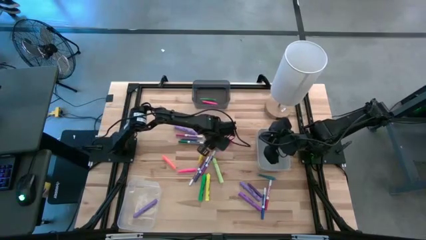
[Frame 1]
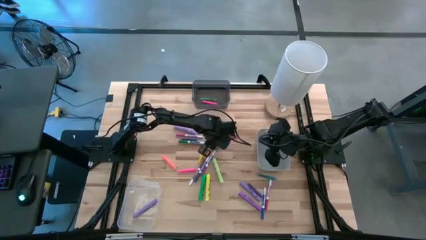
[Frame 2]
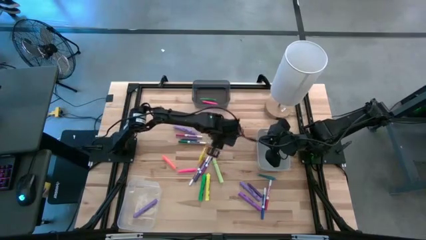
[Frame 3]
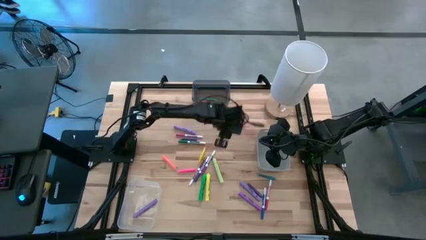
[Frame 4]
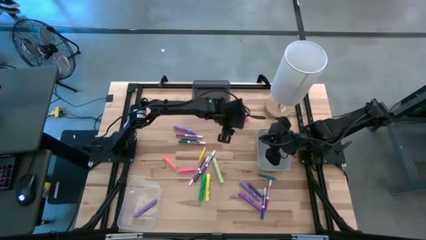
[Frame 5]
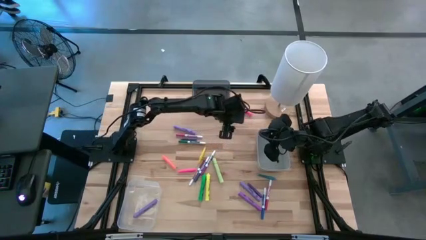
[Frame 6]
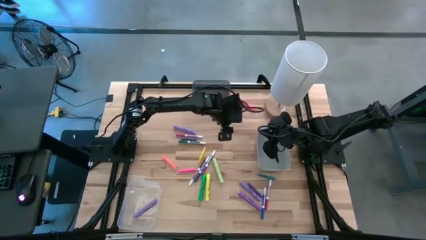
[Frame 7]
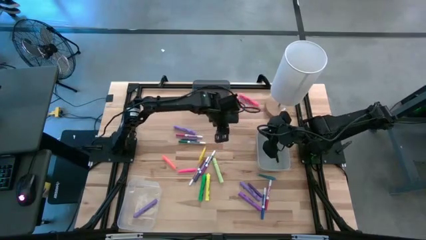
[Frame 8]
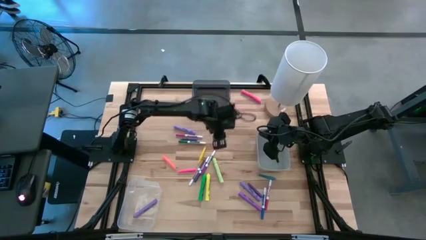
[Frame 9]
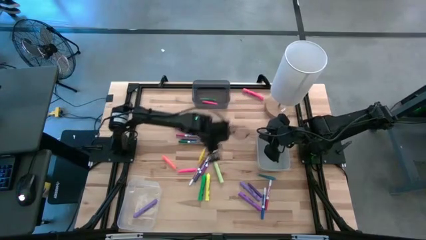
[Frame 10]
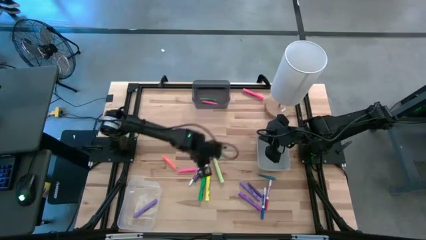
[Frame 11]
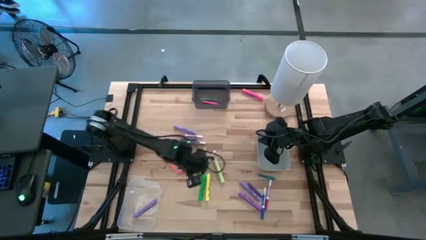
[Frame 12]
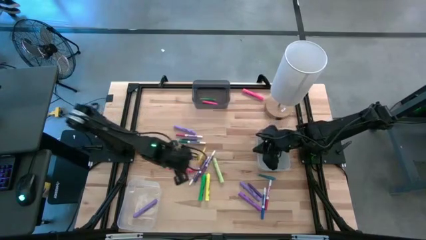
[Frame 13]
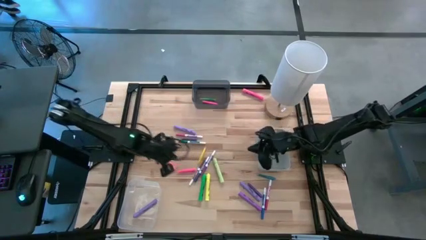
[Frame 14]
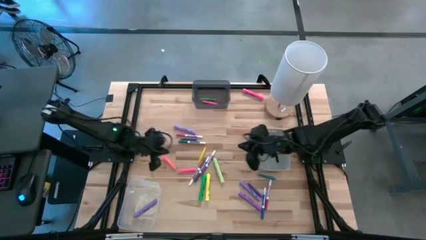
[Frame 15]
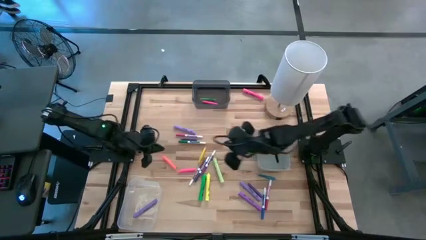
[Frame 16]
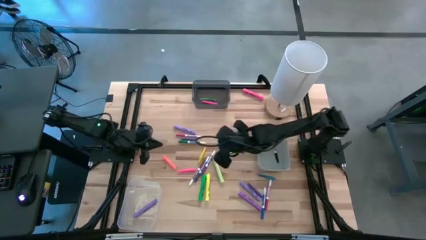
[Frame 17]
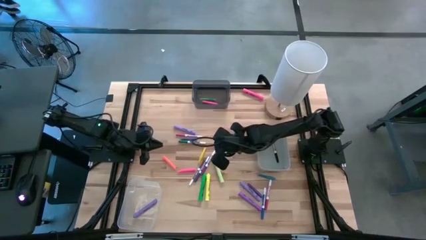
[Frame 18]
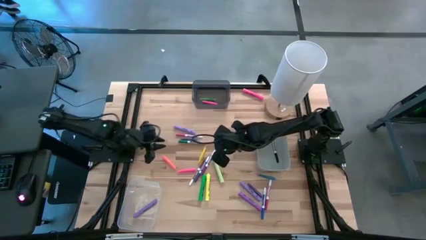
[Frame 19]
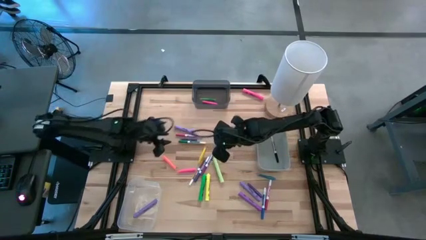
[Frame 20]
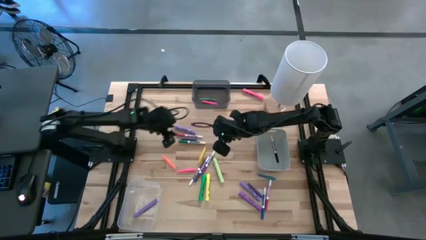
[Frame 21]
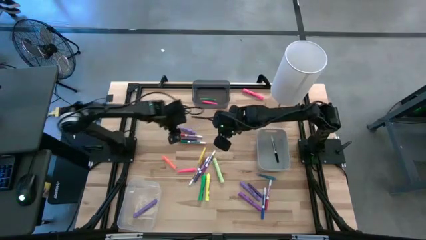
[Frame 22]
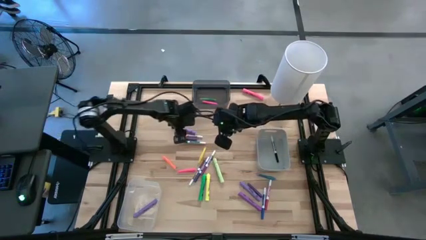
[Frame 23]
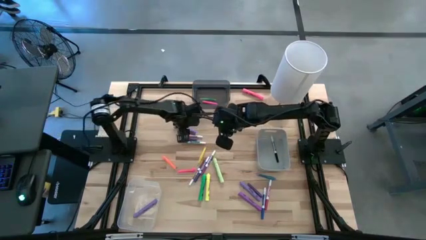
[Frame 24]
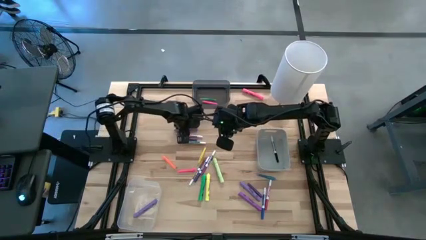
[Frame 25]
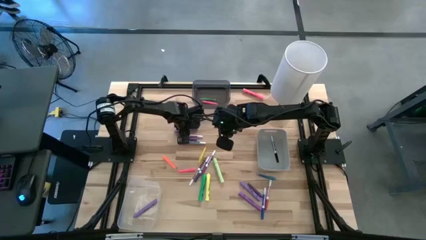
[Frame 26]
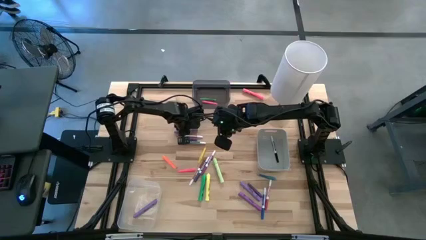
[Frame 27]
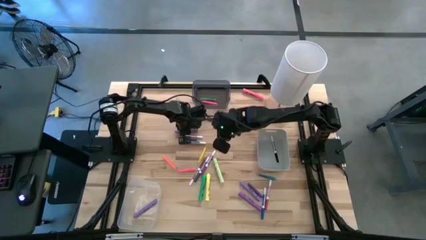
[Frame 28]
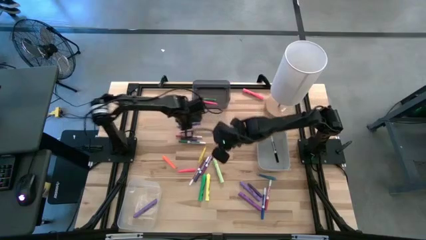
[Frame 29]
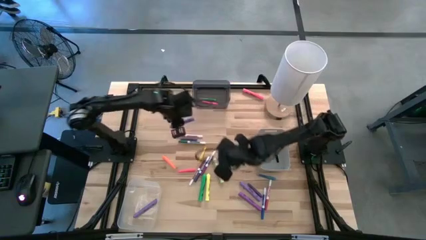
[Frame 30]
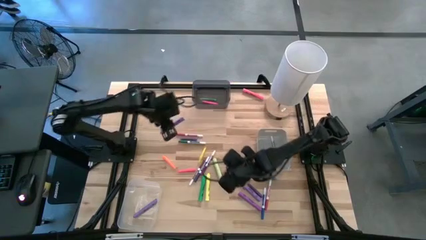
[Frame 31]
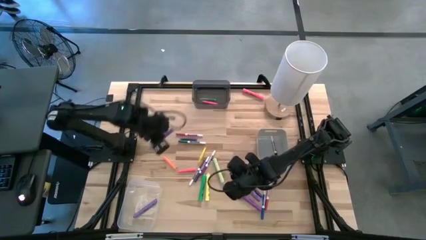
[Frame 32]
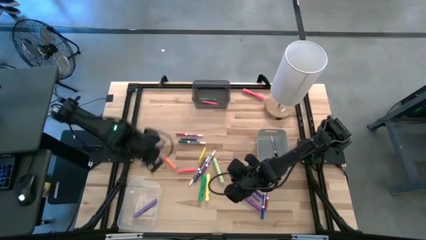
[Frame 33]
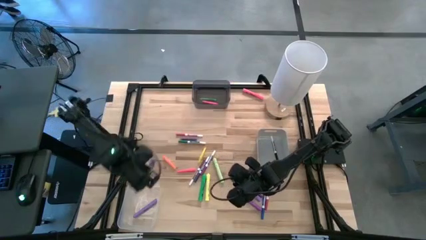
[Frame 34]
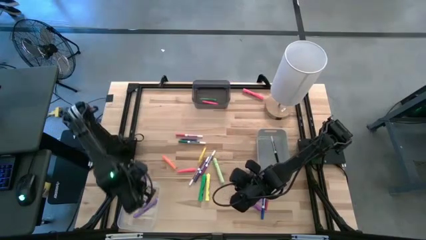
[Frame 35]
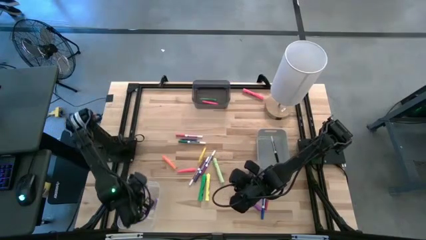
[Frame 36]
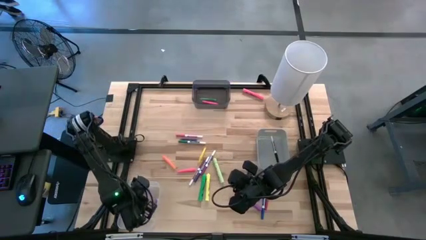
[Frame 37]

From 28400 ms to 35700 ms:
Task: Pick & Place Markers
Put the top purple highlighter pen into the transparent bin

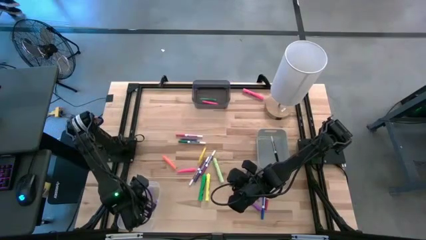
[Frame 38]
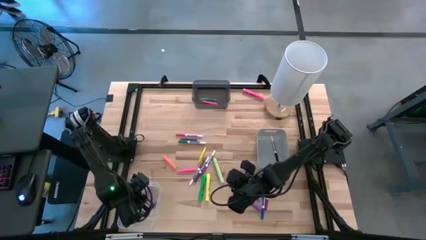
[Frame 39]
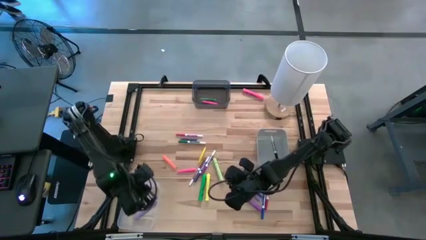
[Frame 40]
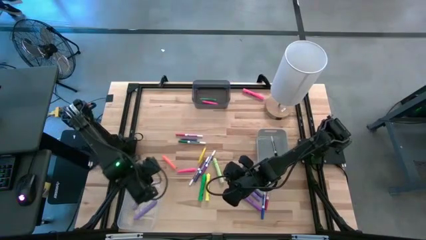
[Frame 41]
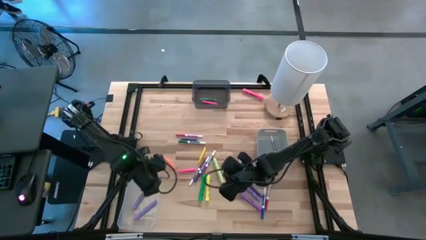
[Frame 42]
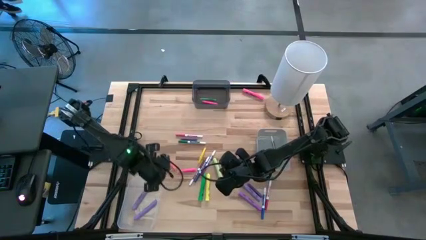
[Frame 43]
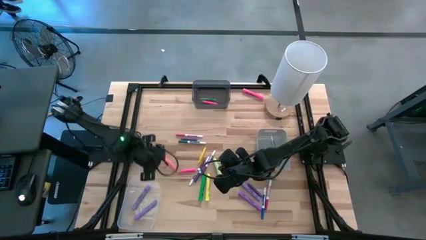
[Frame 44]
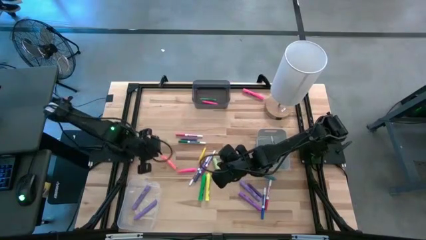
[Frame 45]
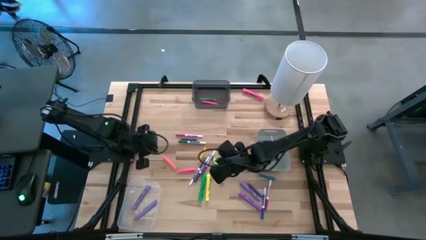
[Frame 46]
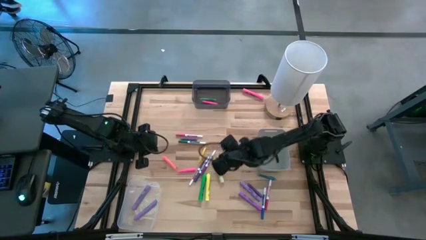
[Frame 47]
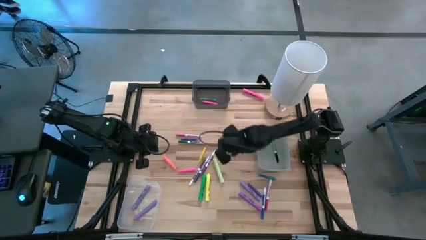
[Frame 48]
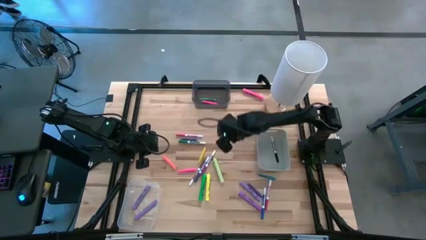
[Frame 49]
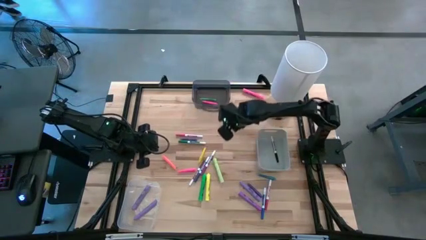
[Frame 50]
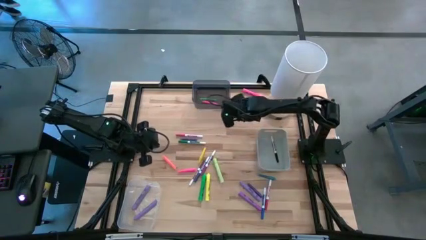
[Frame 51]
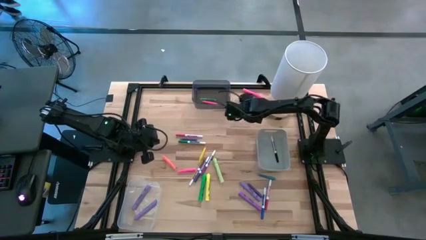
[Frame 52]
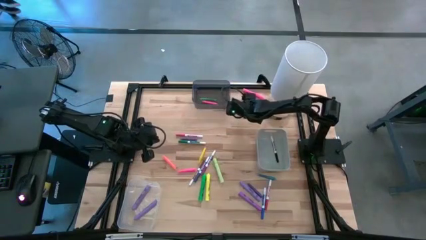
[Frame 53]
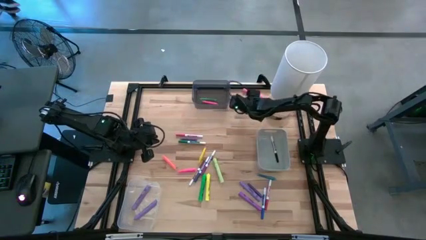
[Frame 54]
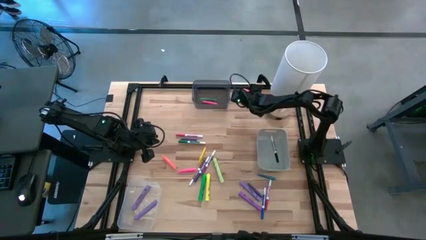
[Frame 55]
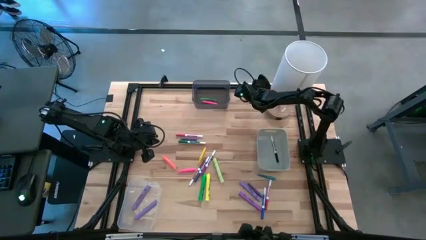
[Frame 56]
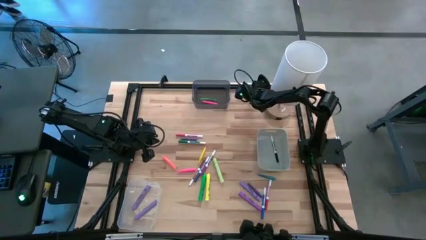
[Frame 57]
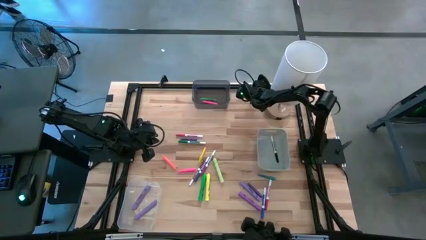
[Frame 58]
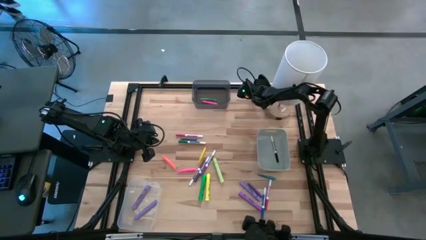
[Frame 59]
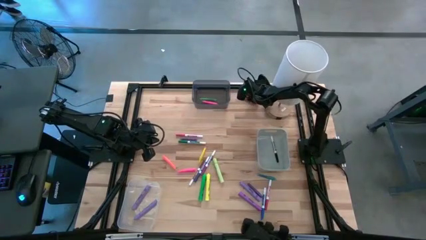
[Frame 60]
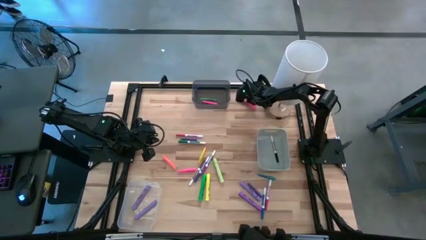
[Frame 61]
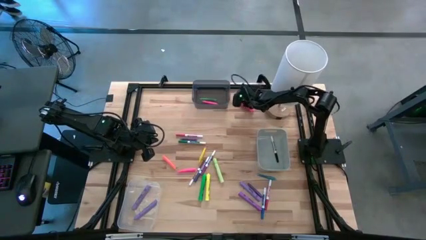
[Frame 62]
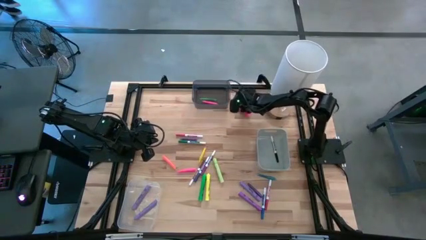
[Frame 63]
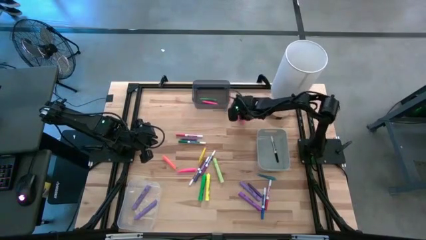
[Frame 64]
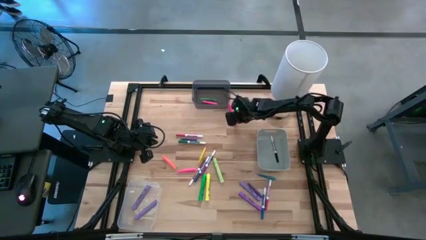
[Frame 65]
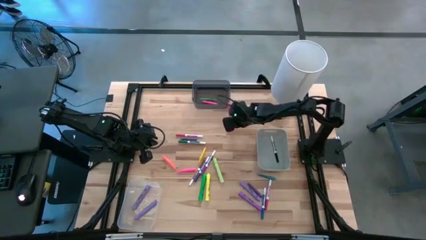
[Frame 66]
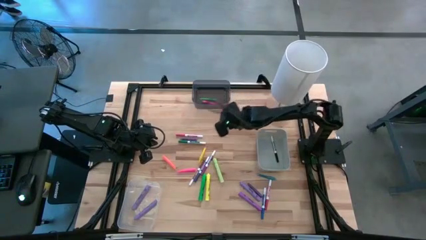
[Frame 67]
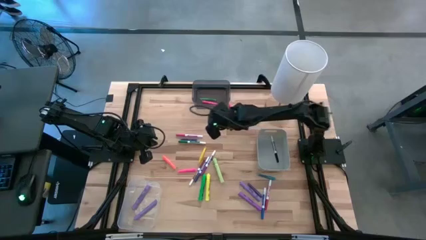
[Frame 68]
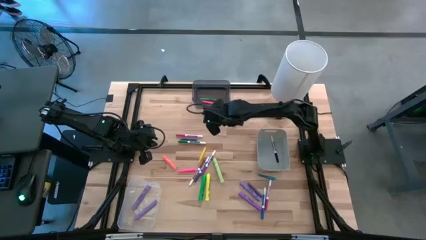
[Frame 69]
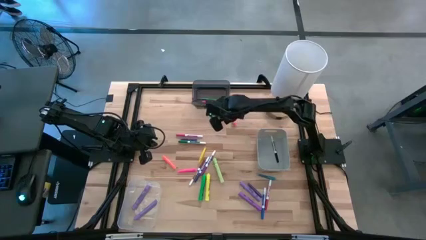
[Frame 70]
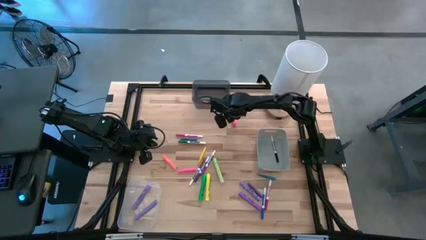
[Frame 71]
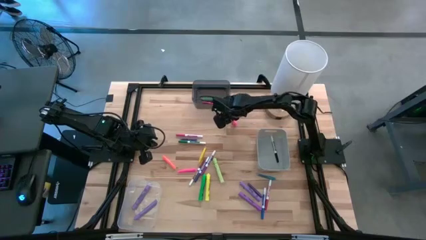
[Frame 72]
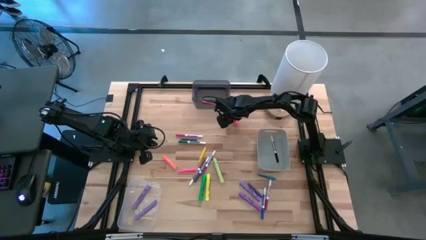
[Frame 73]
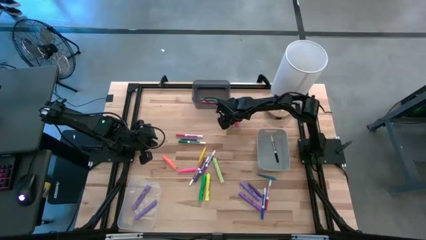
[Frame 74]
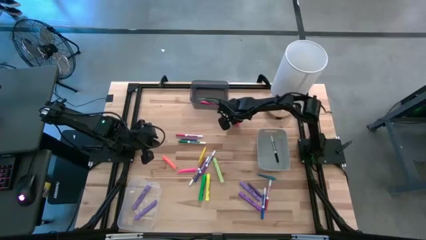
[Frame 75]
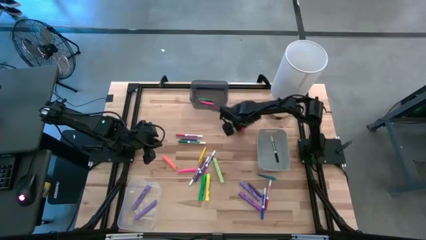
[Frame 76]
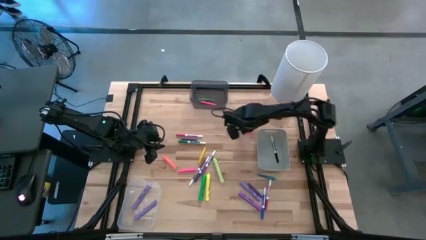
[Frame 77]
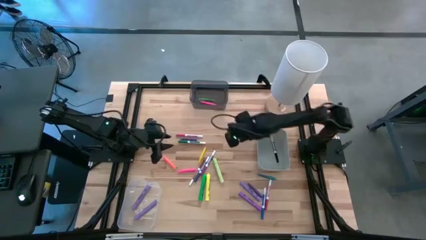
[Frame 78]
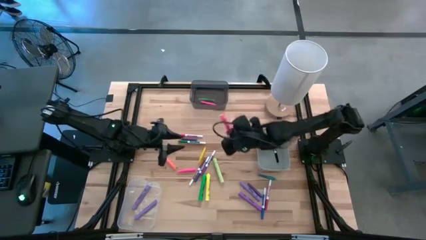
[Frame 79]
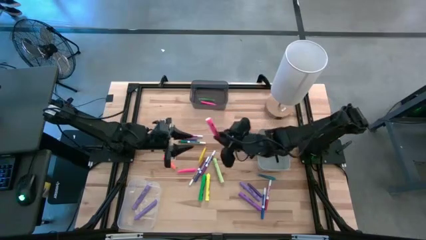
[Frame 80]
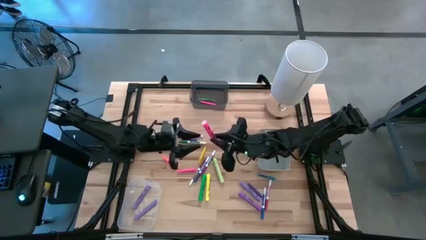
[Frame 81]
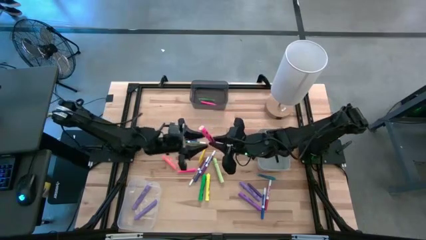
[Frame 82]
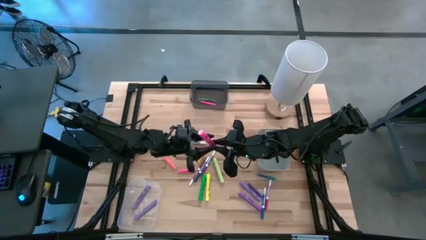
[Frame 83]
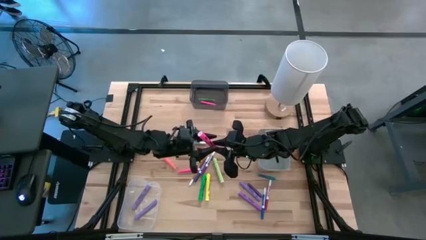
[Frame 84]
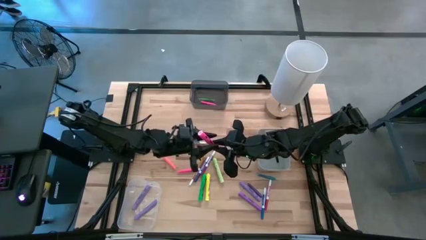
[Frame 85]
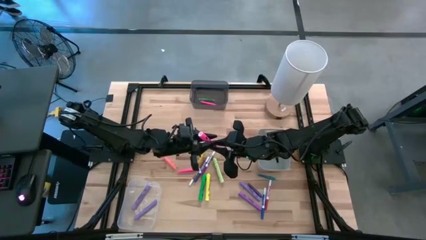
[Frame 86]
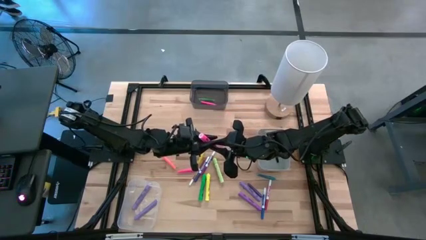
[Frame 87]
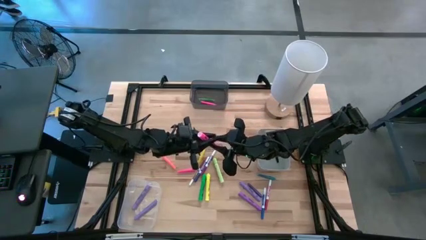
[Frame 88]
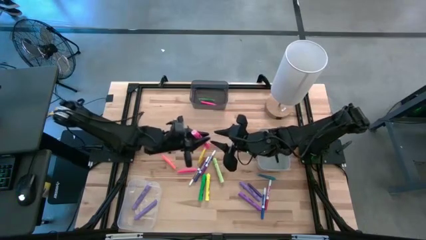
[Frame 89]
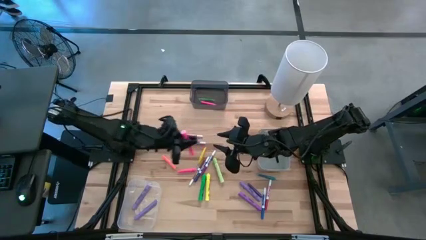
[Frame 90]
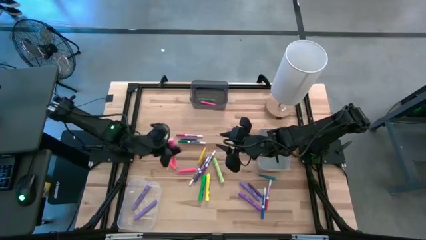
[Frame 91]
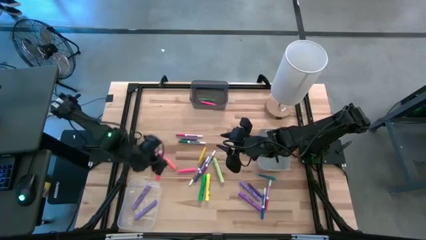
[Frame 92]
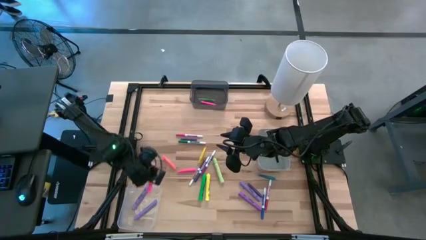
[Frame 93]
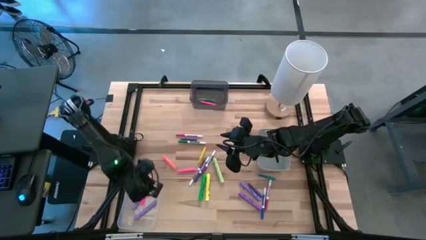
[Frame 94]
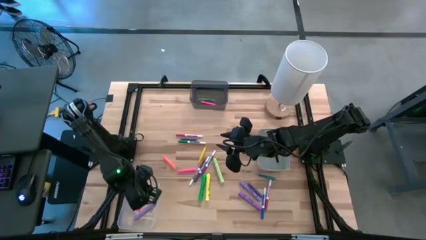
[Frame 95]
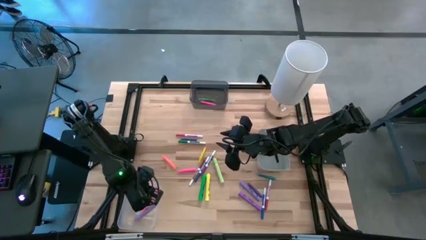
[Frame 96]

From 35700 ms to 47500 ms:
Put the pink highlighter pen into the transparent bin
